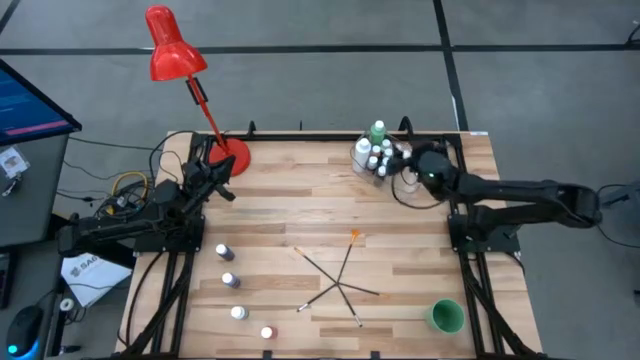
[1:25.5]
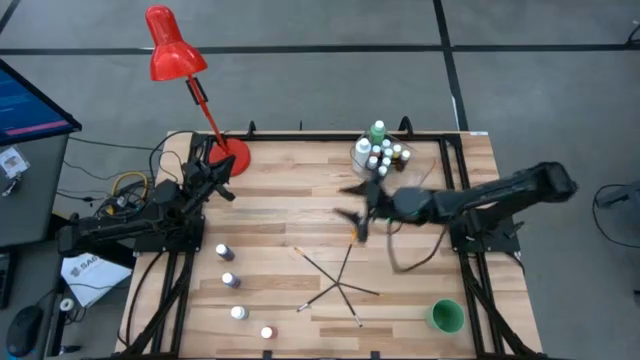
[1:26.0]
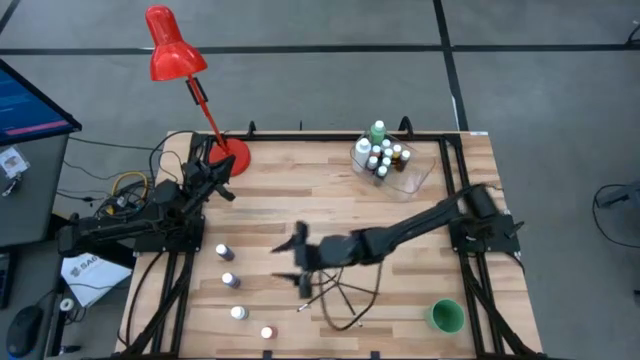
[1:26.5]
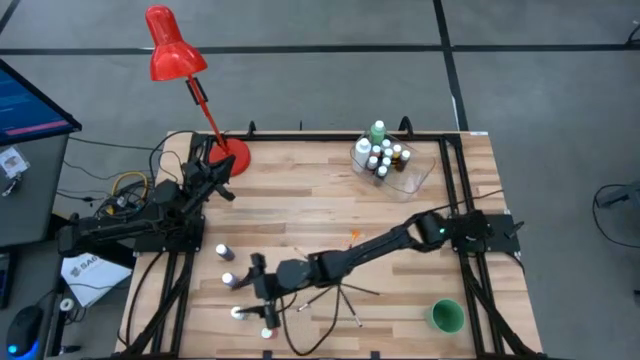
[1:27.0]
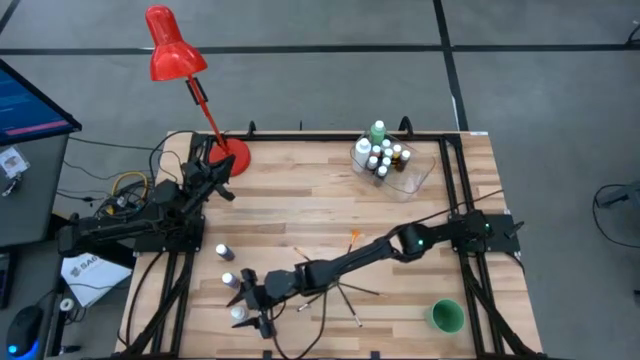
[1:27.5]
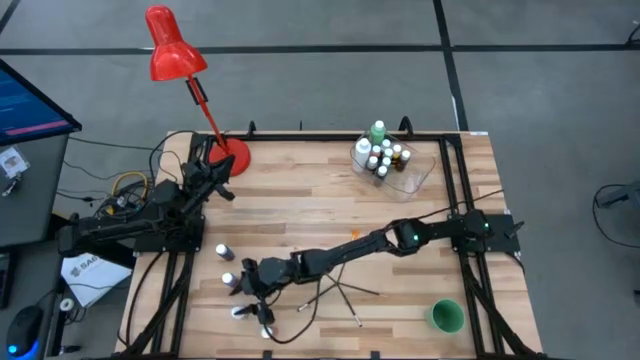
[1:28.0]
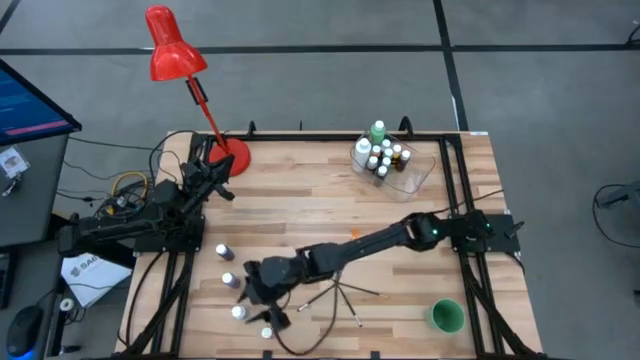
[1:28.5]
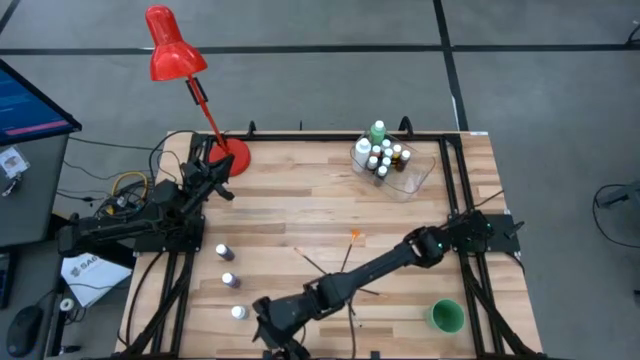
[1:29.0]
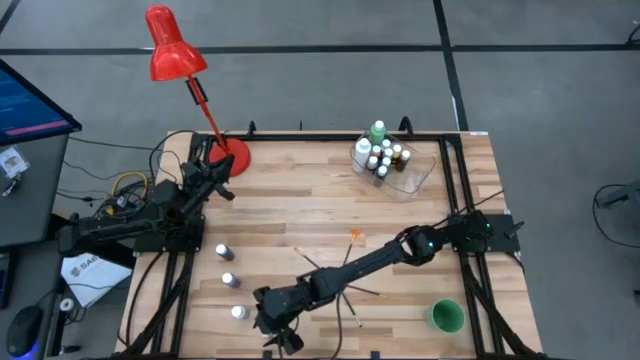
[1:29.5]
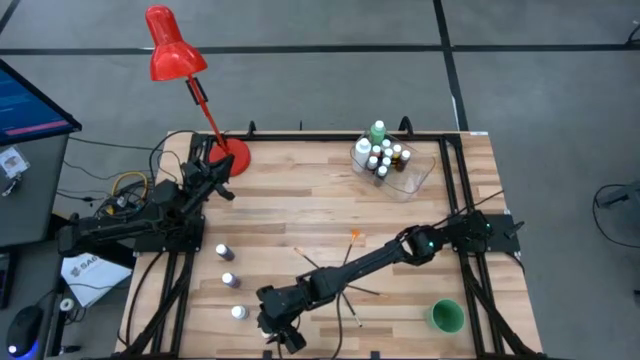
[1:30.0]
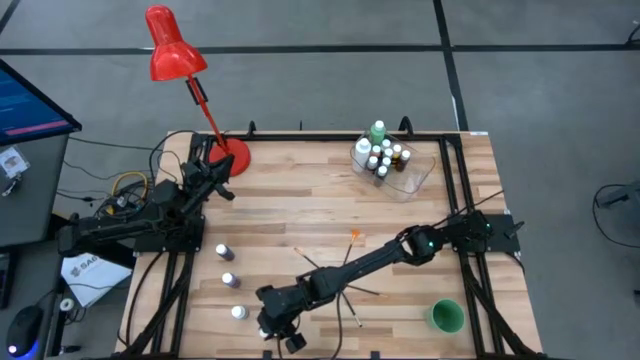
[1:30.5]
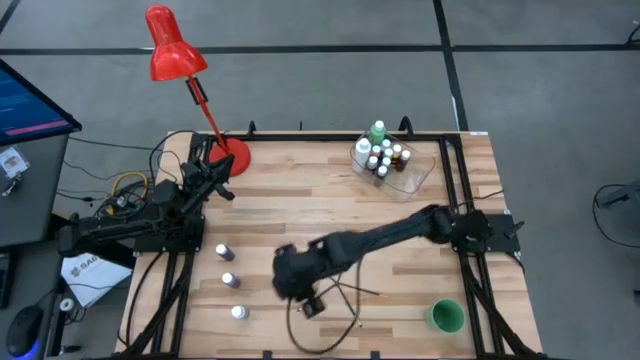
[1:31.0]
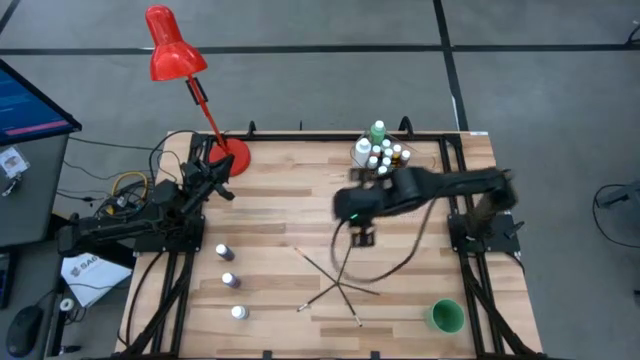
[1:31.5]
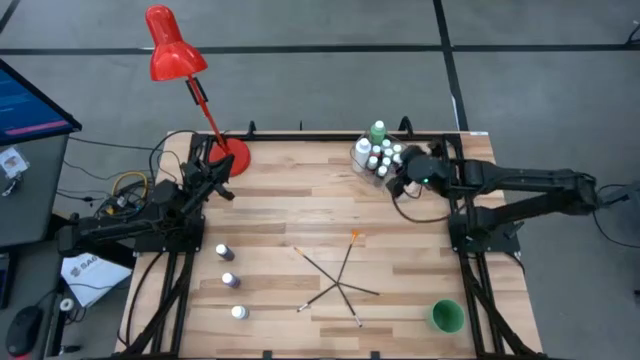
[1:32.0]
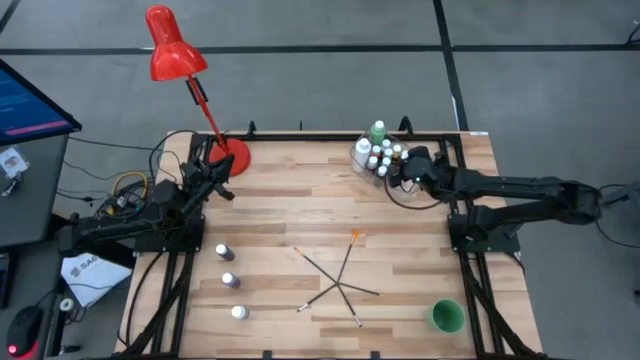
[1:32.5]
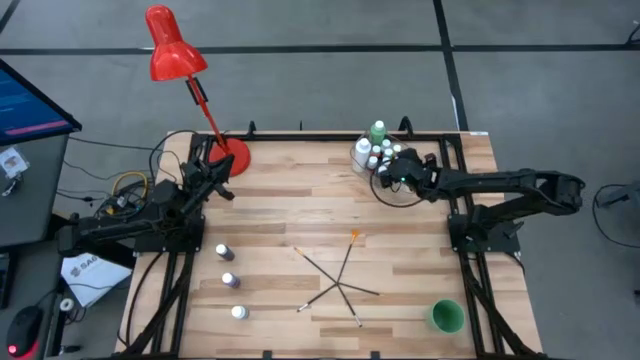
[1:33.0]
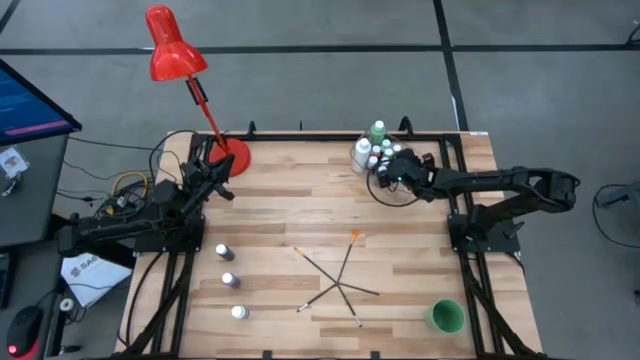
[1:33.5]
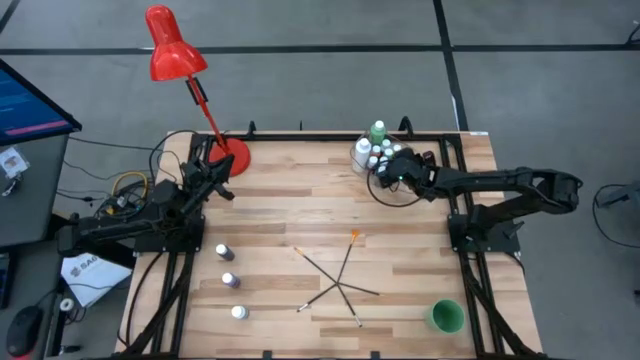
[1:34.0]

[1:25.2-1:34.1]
Task: Pick & Place Paint Supplies
Put the small red paint bottle into the transparent bin

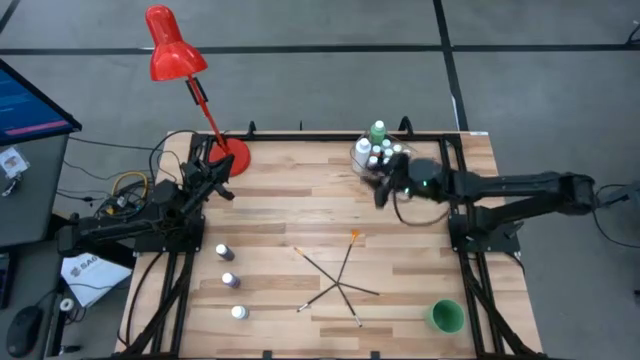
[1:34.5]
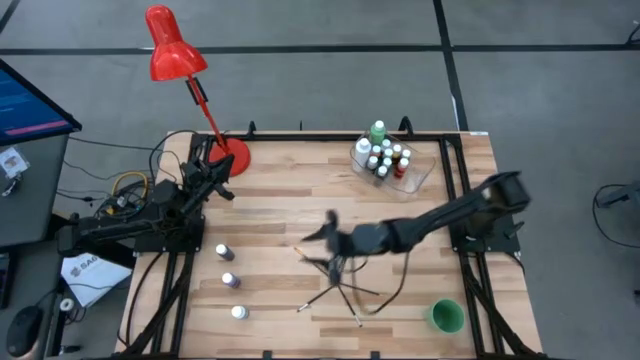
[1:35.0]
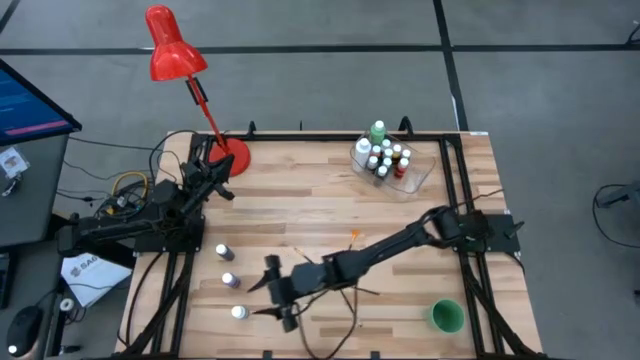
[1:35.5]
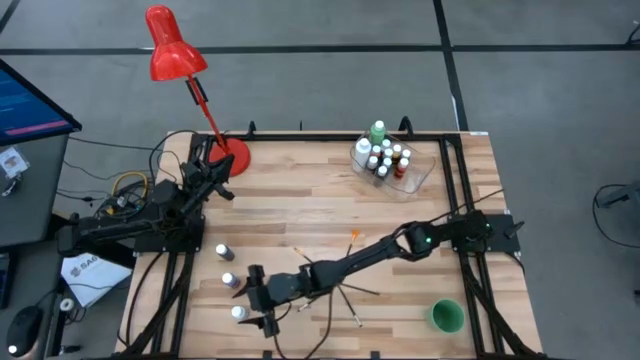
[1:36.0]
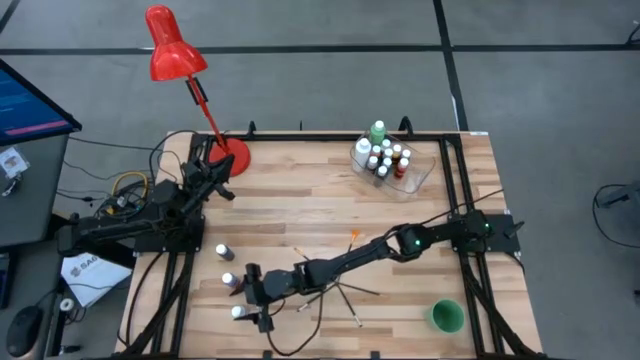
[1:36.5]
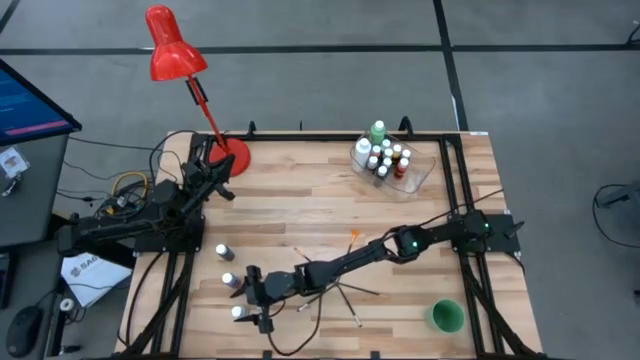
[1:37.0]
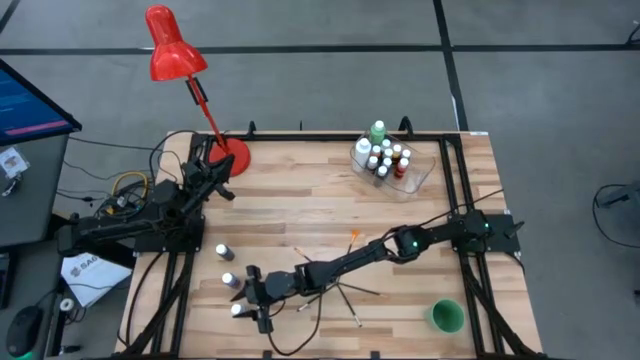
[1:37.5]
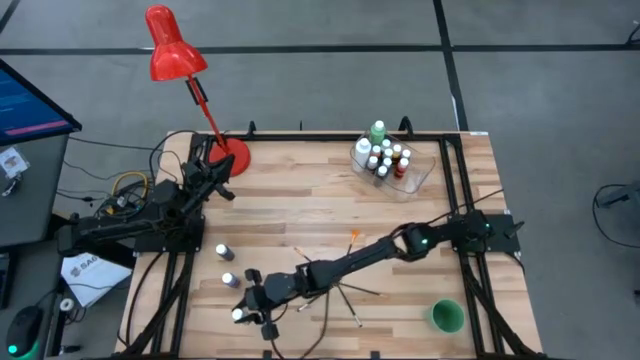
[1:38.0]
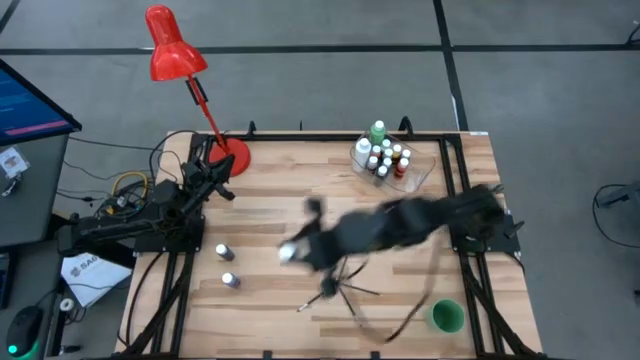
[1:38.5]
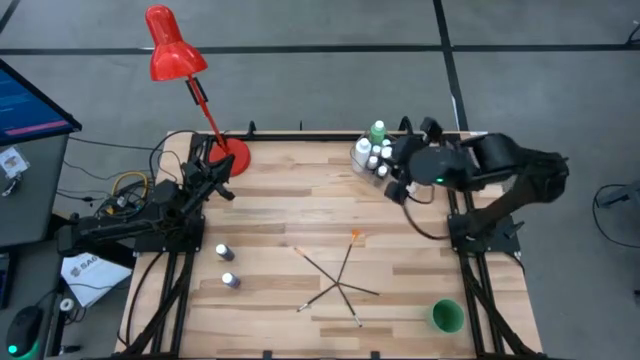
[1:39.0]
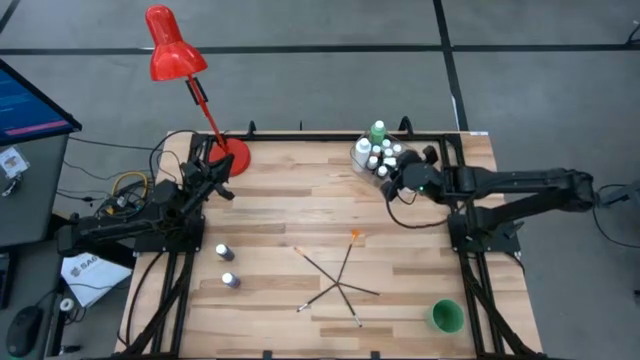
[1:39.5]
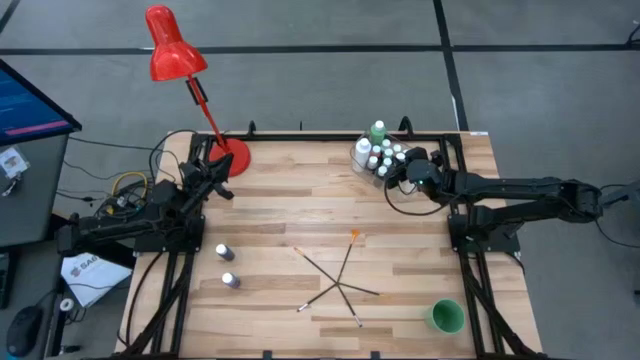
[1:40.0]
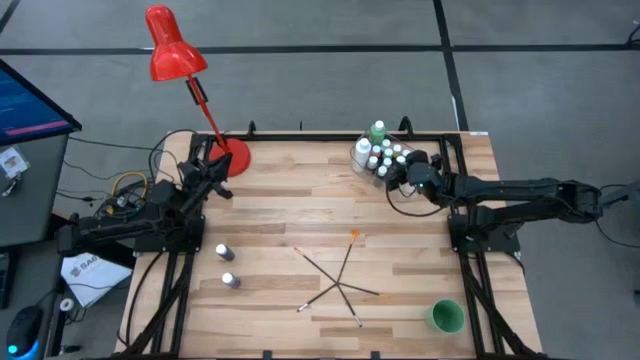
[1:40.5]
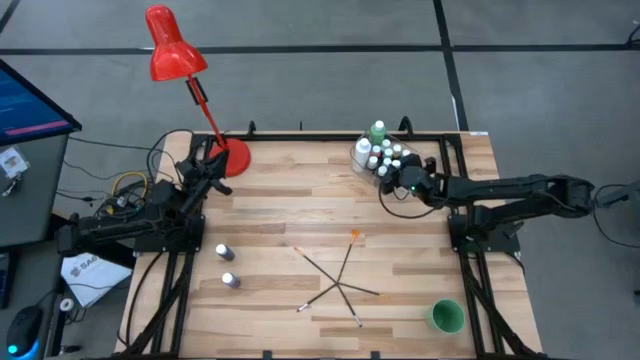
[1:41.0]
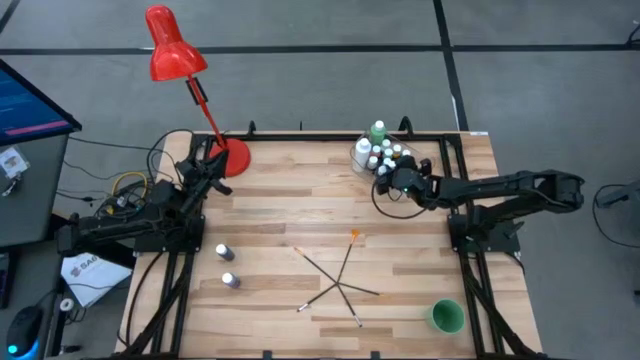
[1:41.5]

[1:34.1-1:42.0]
Put the small white paint bottle into the transparent bin

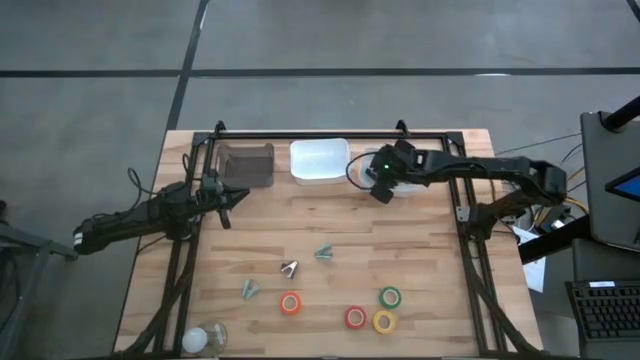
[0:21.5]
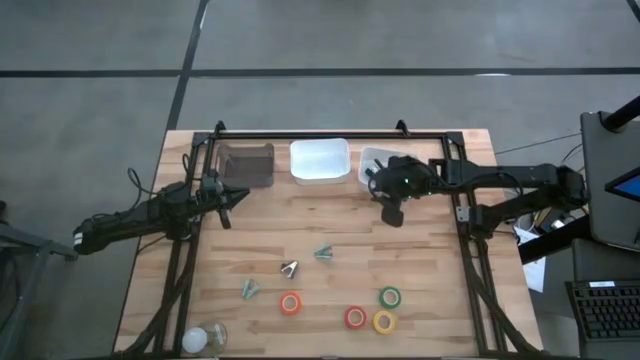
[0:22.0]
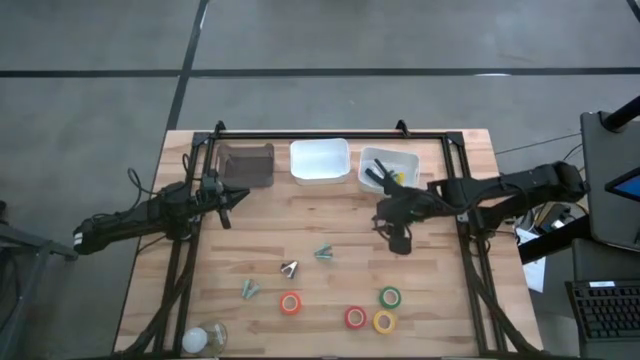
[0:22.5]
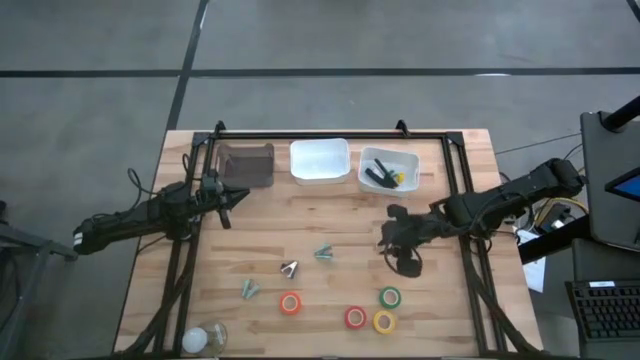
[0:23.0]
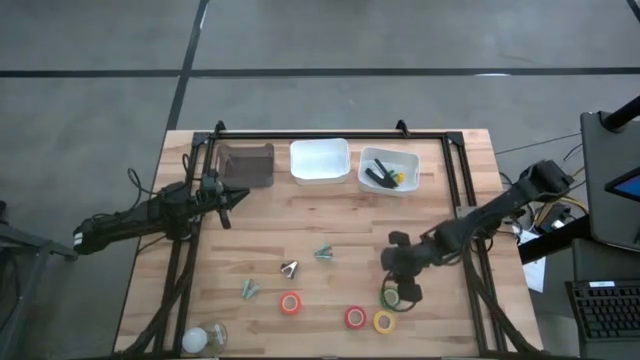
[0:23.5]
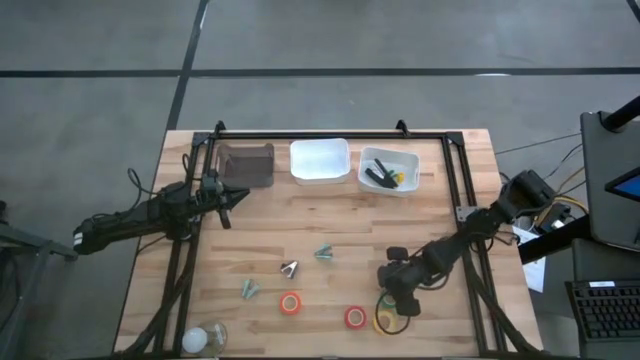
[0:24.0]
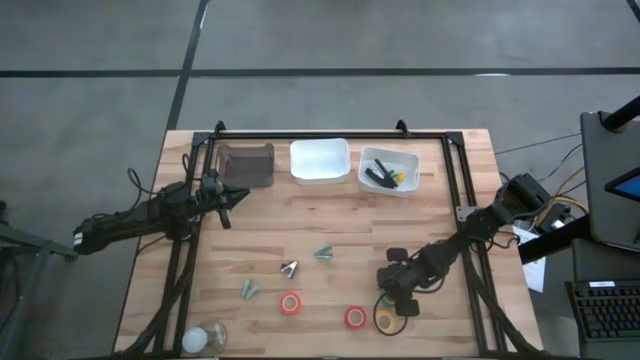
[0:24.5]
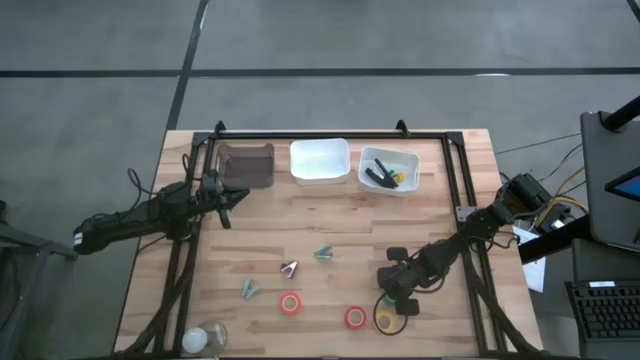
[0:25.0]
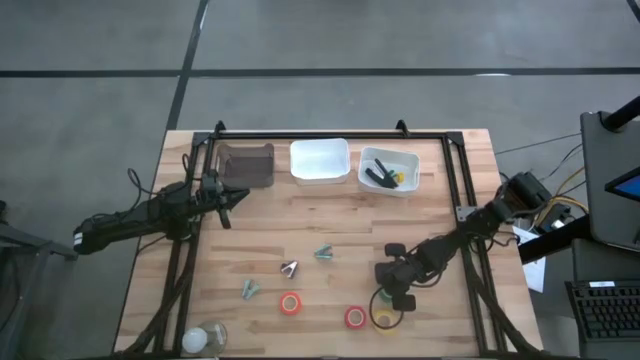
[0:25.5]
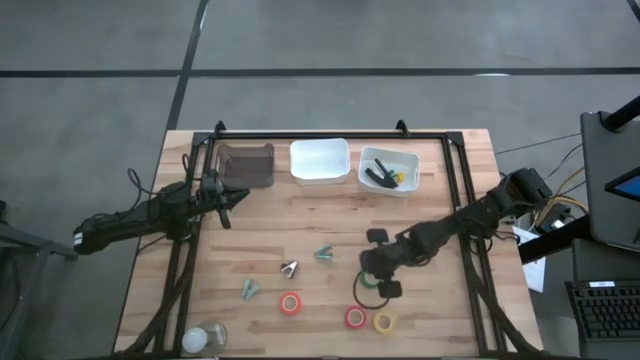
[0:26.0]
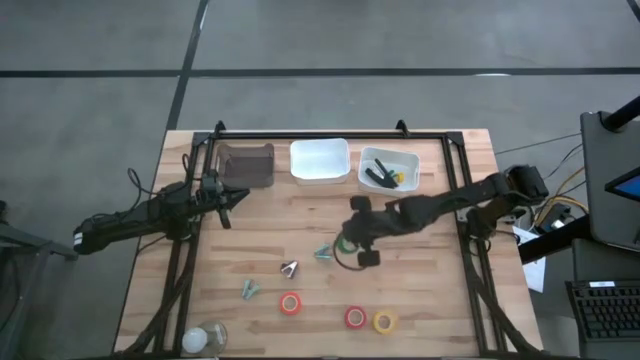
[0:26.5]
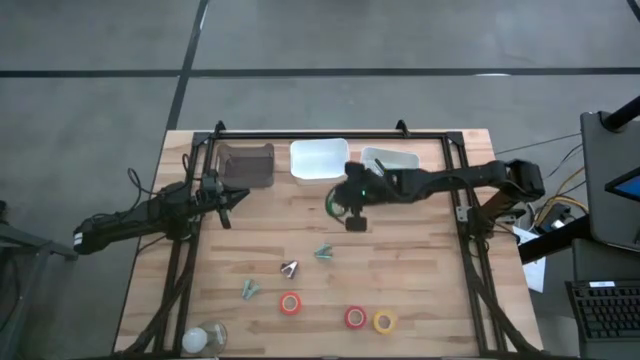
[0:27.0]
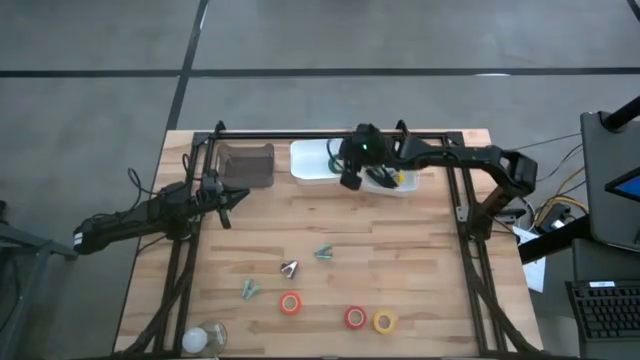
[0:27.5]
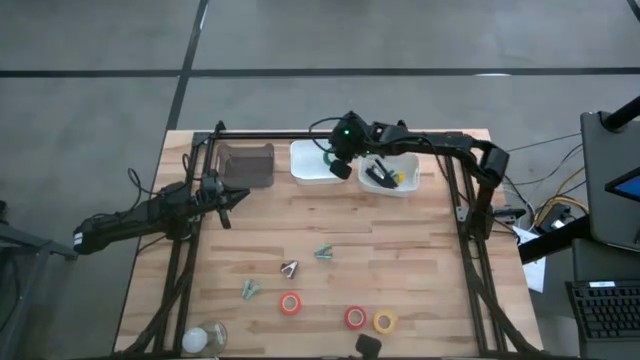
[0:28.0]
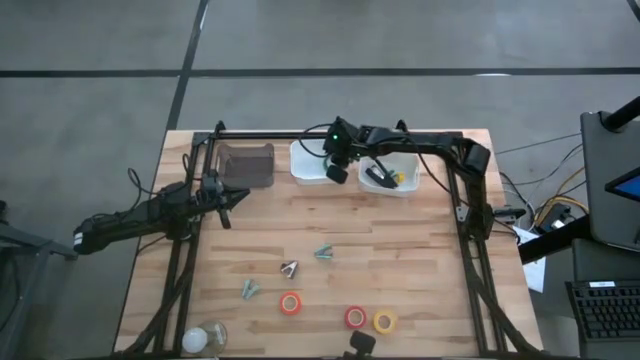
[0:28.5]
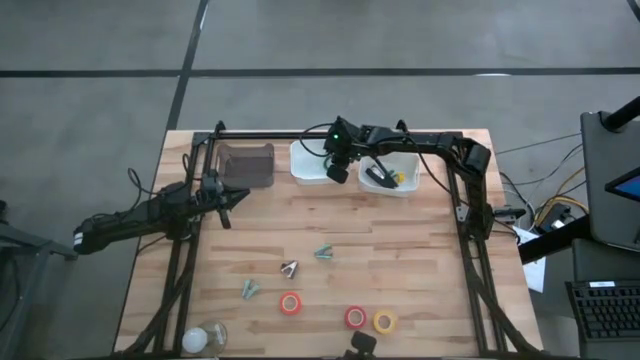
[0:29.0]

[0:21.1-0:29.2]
Task: Pick and place Stapler, Stapler remover, tape
Put the green tape into the left white bin
